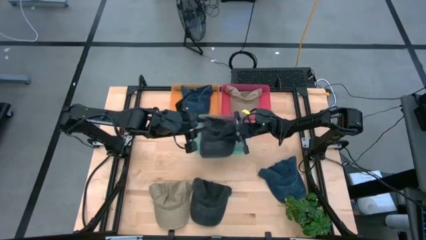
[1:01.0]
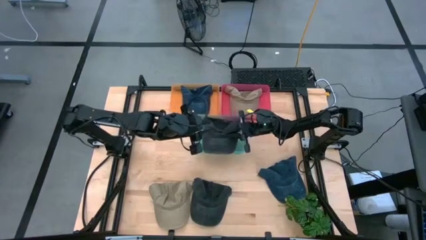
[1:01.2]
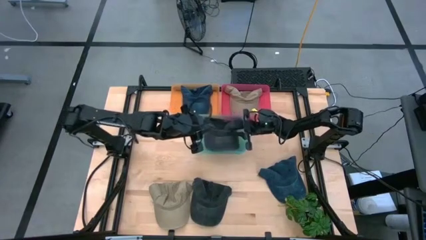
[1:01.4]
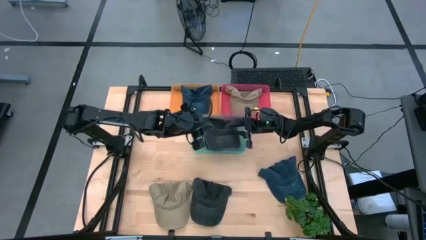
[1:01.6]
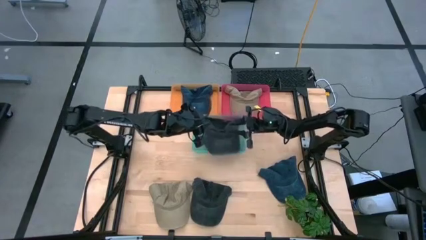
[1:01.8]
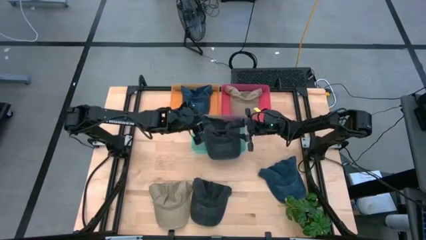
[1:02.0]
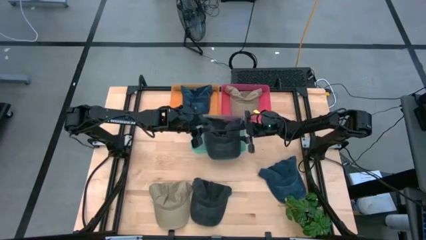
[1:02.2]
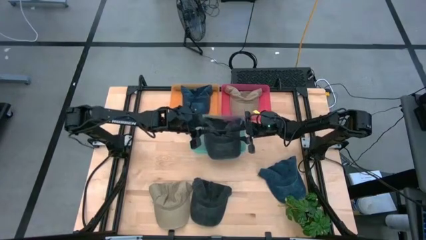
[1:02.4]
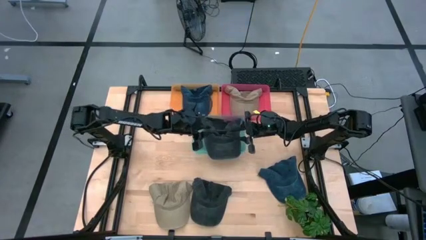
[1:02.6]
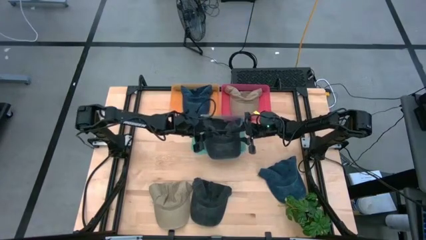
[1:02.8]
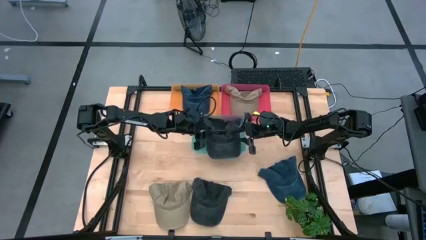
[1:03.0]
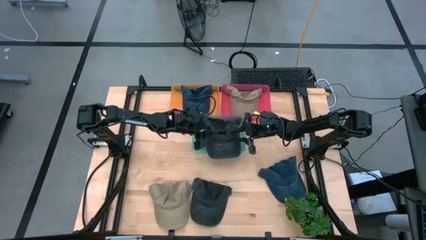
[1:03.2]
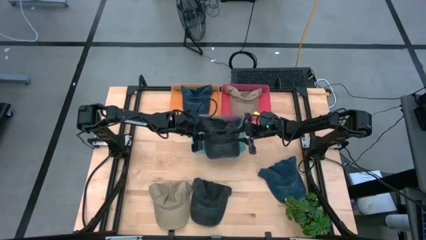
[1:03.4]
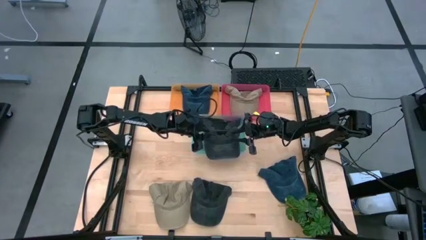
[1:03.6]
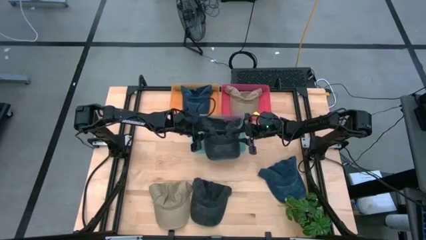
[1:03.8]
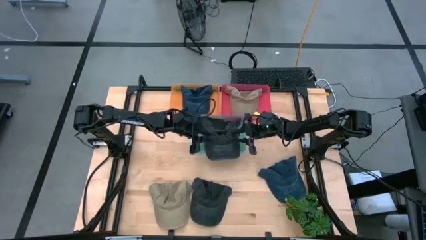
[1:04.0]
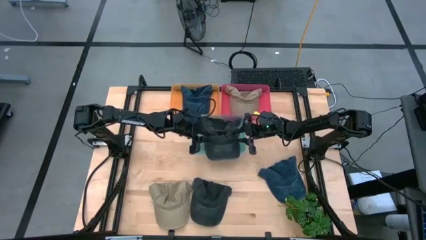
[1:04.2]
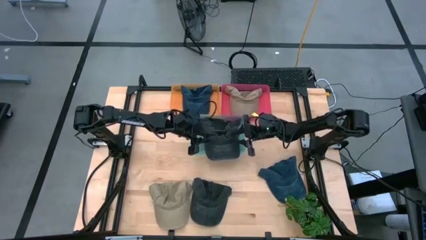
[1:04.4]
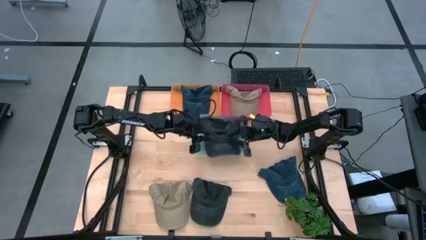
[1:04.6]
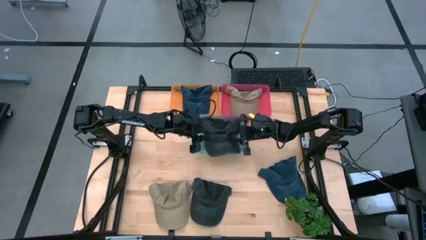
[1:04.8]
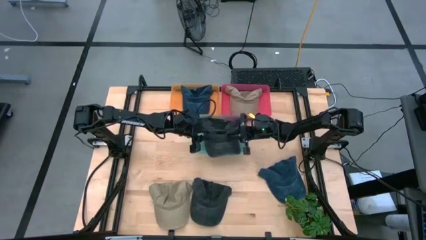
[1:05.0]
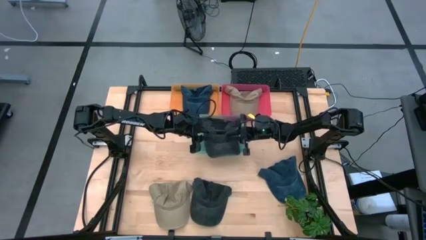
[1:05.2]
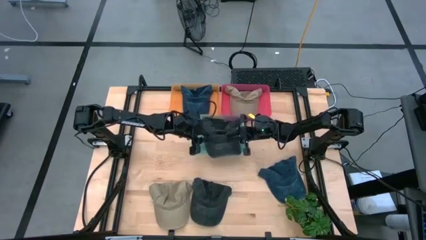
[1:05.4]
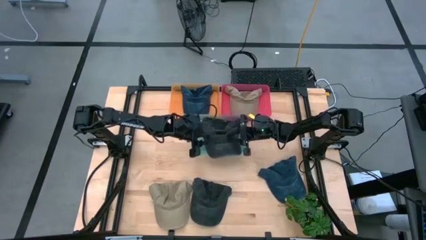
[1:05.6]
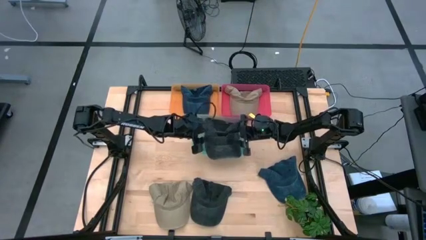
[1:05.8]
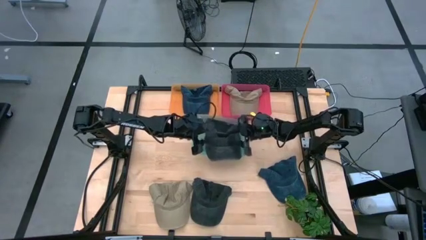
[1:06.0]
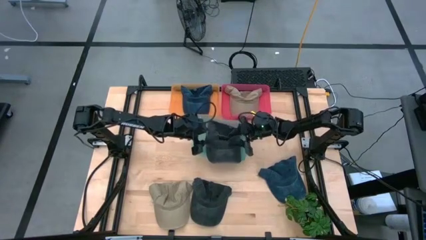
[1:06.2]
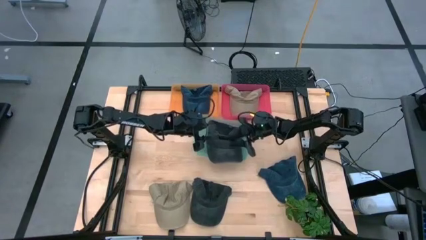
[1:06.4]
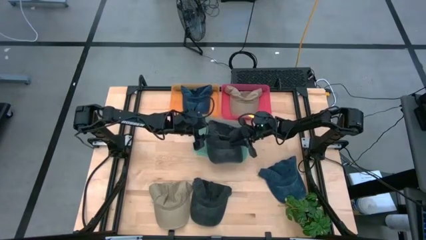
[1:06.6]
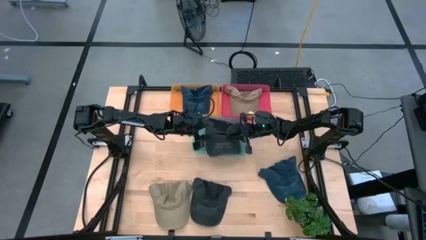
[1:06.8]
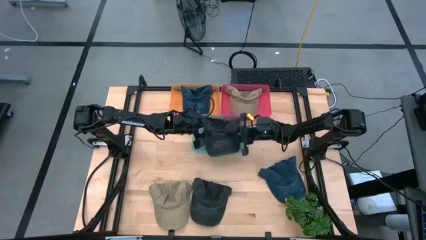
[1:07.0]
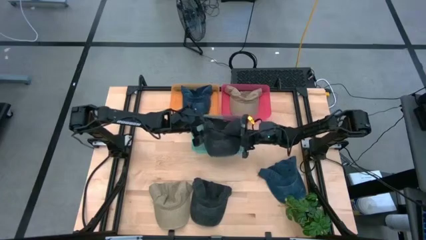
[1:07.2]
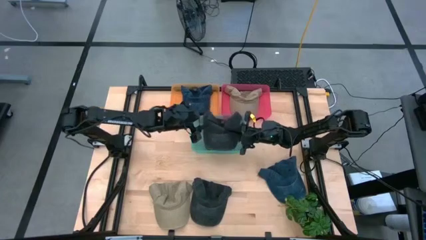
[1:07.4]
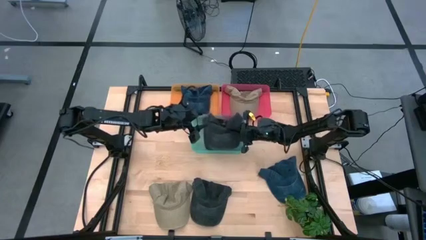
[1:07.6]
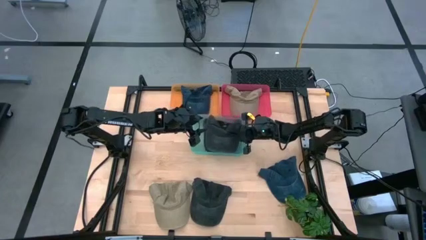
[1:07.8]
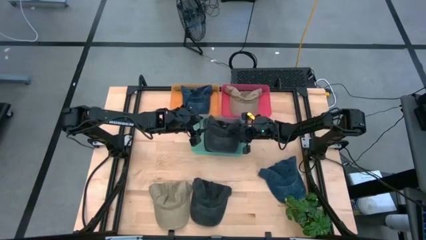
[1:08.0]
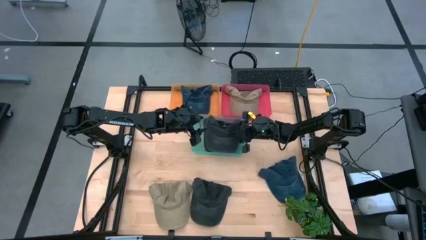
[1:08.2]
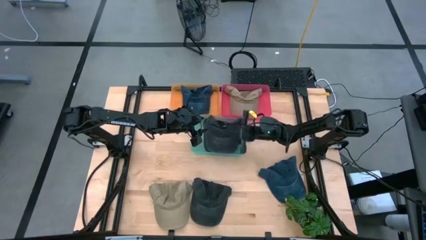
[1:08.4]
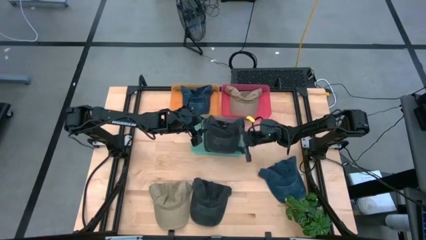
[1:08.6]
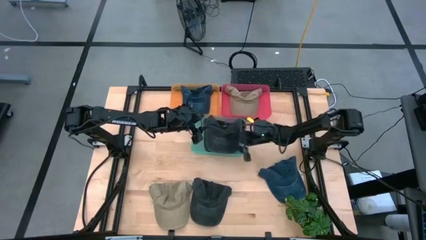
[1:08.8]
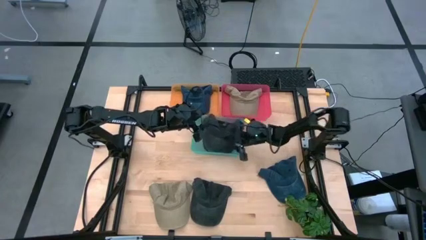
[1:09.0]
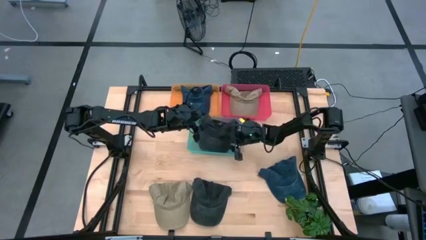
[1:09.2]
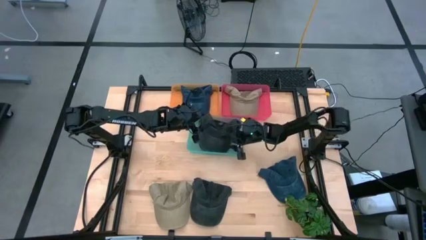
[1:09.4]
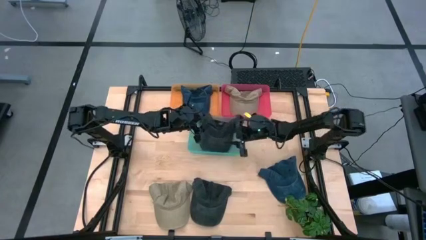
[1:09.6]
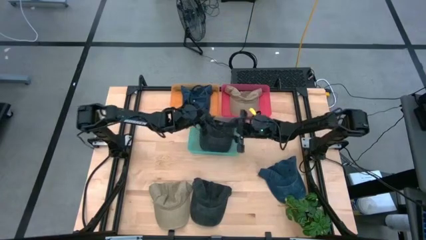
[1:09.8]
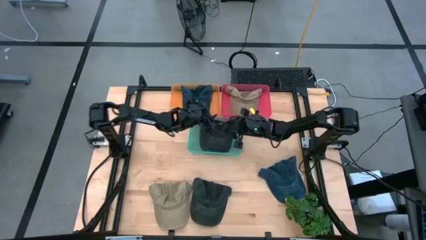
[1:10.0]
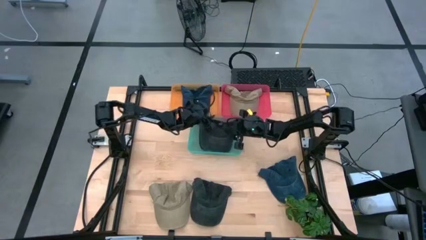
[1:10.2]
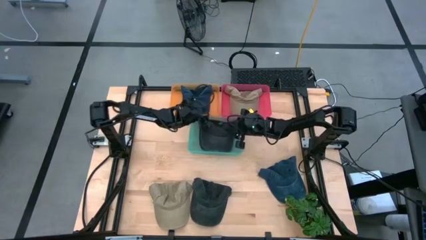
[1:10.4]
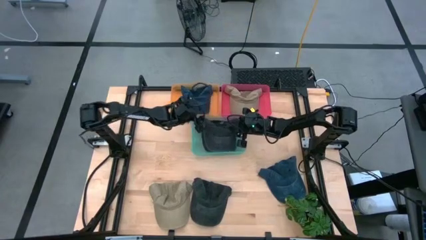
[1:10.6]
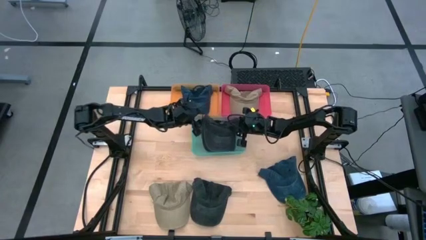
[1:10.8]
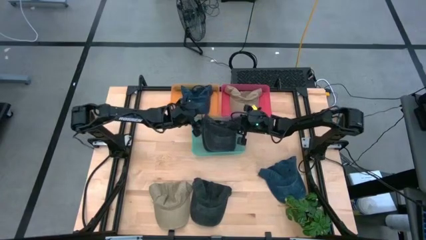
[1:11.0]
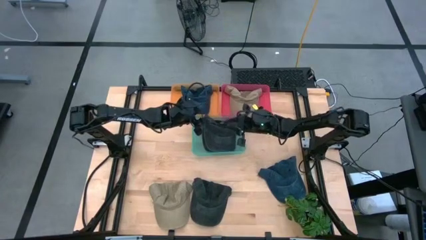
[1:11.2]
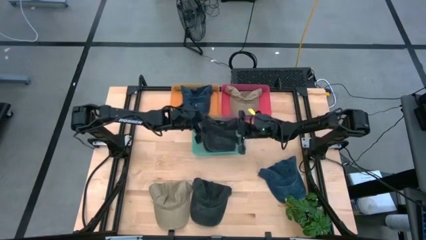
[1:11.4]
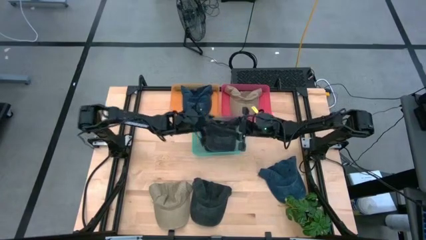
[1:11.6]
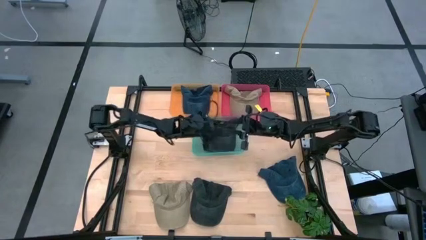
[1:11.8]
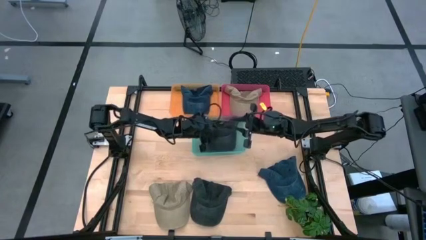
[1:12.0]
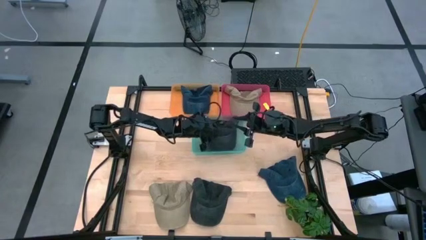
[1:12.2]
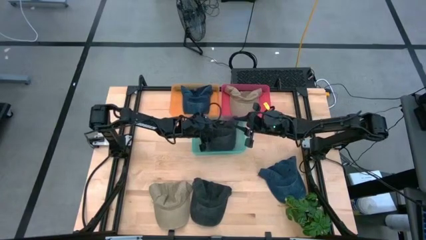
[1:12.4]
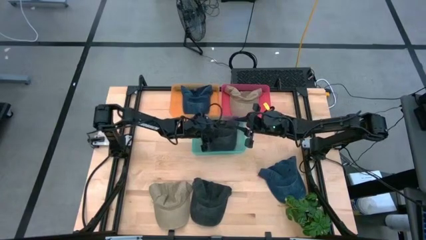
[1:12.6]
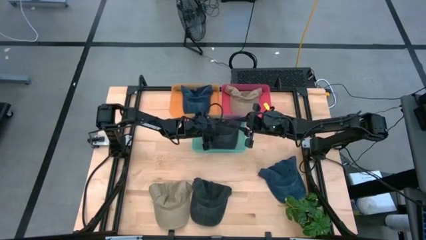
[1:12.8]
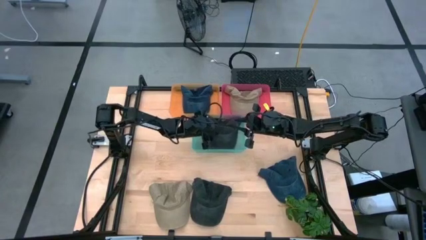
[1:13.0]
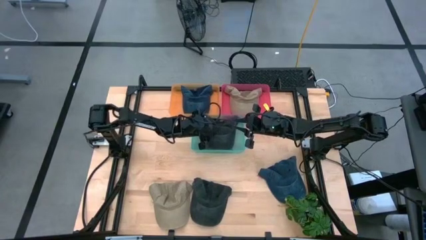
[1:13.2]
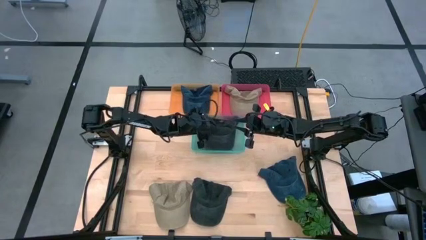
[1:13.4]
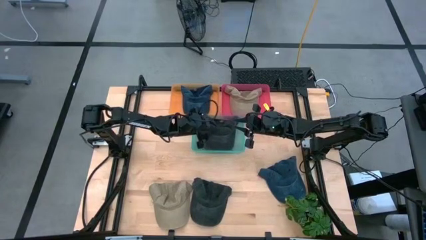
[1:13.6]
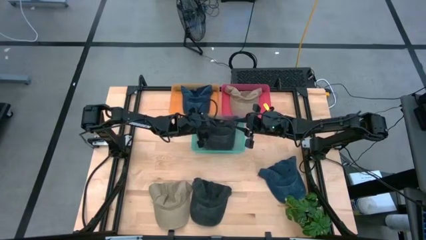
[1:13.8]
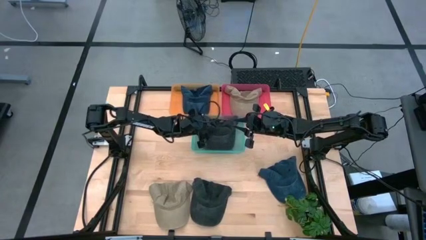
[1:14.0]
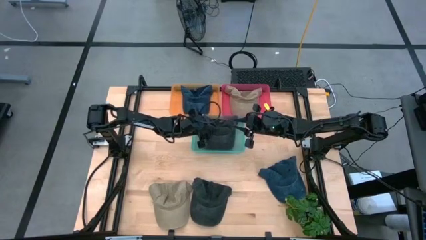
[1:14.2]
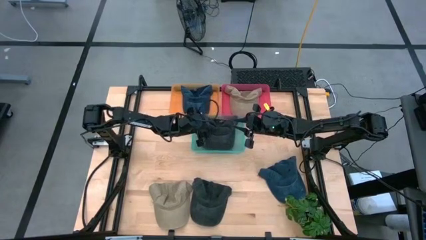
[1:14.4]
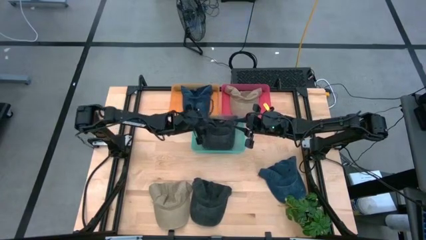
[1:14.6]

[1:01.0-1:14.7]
Task: Pick & Place hat
Put the top black cap into the blue bin

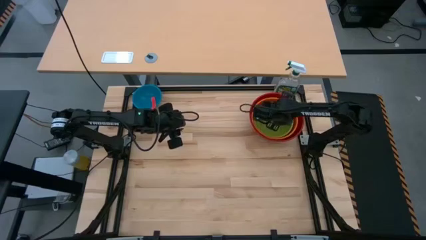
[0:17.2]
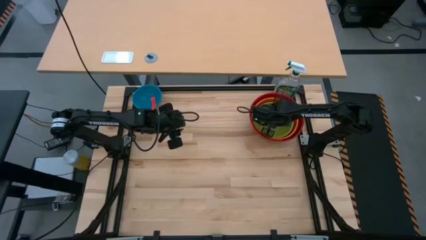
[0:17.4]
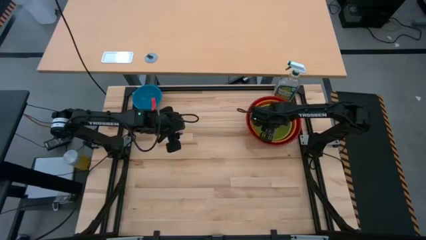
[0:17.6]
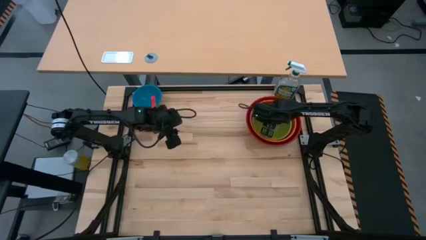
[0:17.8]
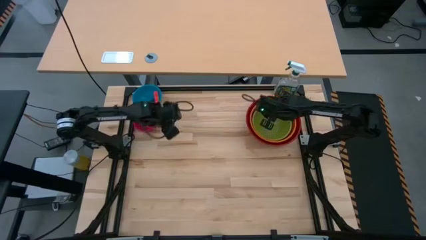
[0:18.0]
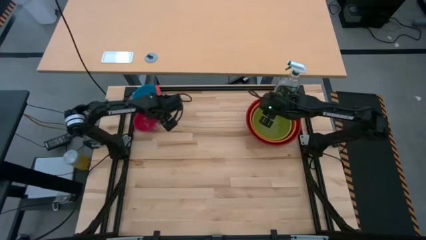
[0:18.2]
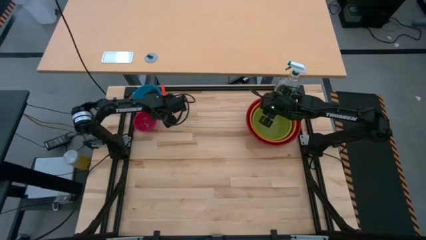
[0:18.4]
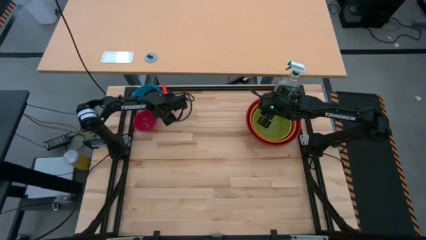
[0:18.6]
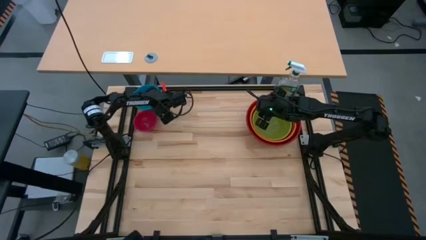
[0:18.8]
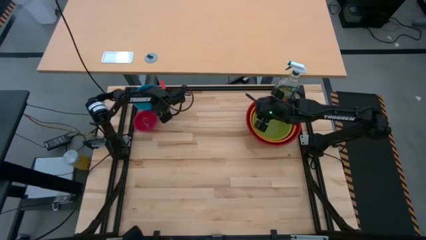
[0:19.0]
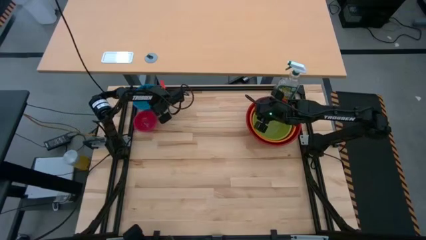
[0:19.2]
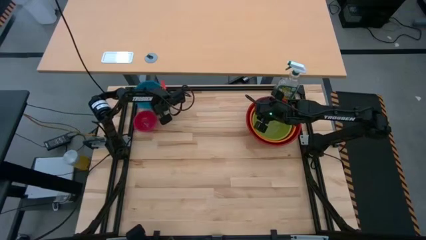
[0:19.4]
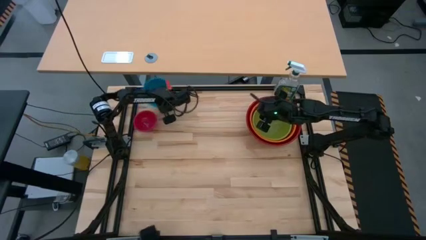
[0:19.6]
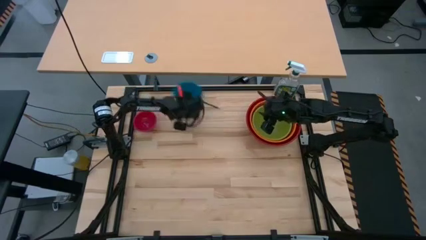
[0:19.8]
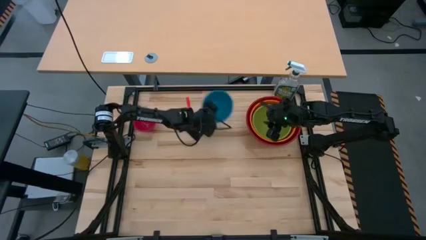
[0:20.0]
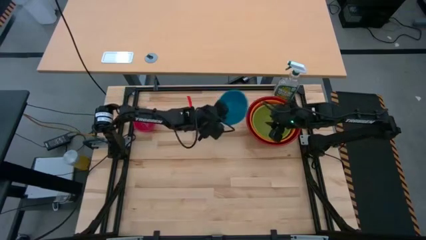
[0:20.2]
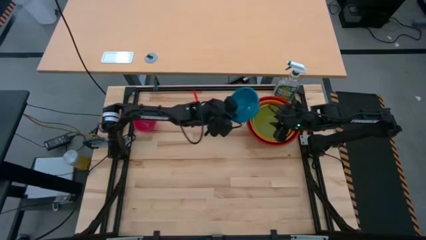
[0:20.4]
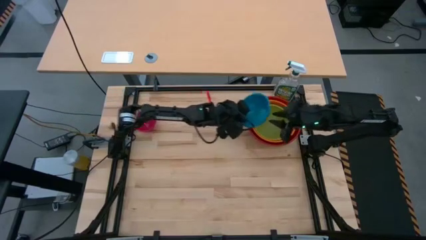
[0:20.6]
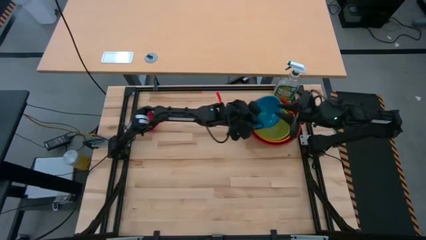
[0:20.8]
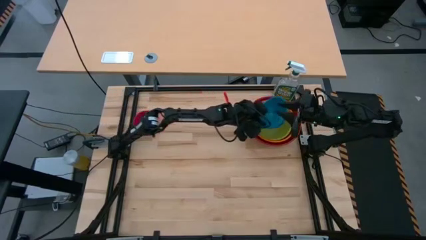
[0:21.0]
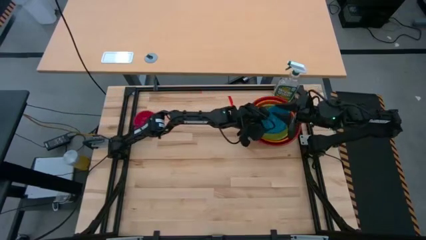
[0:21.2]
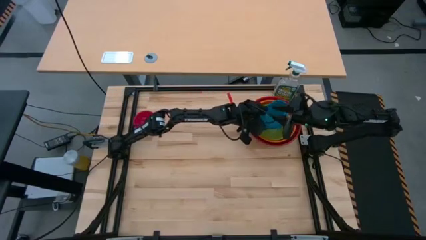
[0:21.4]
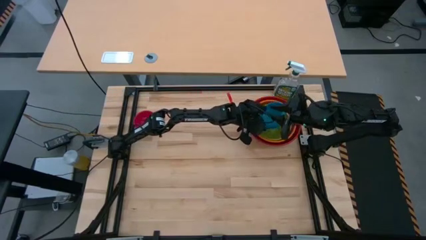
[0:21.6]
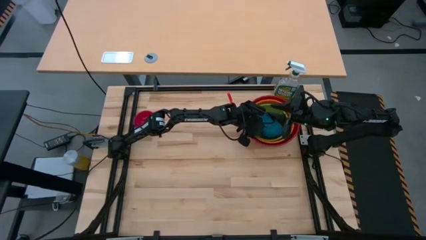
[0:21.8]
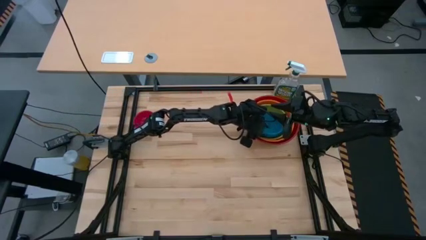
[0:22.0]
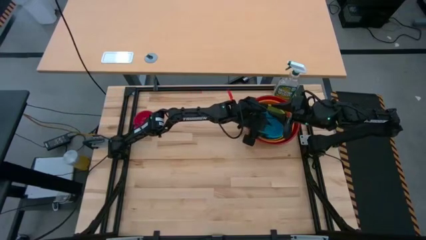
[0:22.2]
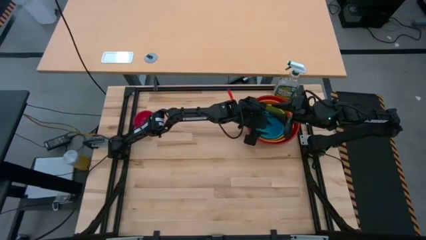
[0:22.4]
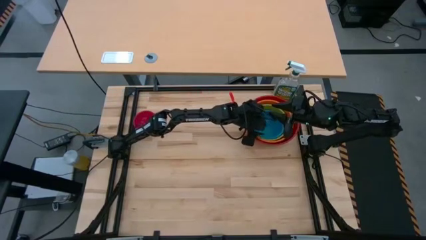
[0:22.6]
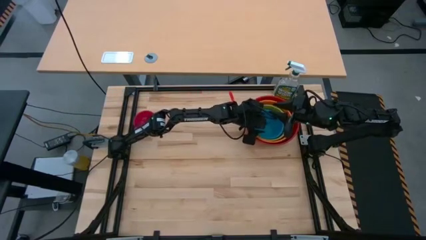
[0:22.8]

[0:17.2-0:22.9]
Task: Nest bowls inside each other by size order
Stack the blue bowl on top of the green bowl
